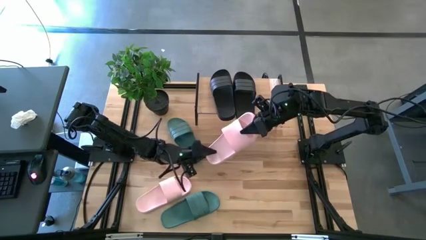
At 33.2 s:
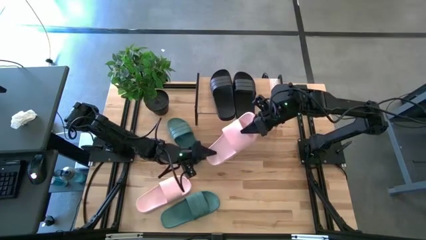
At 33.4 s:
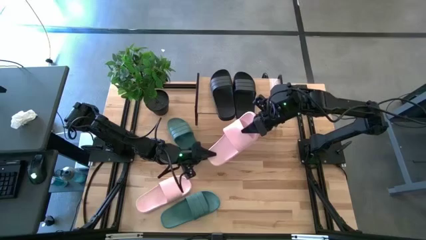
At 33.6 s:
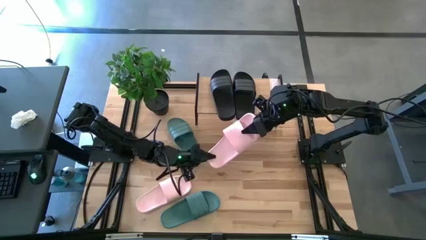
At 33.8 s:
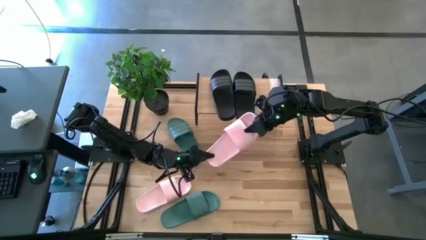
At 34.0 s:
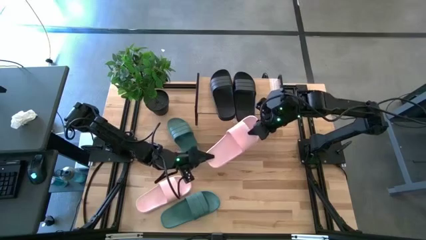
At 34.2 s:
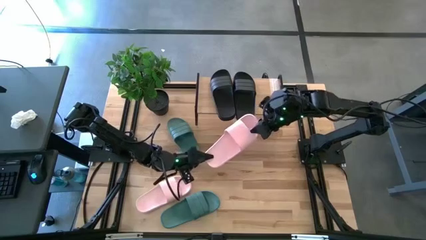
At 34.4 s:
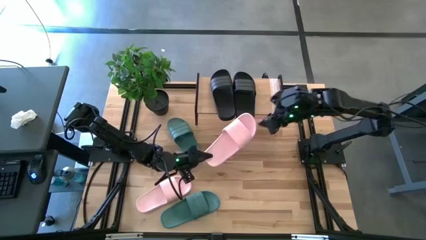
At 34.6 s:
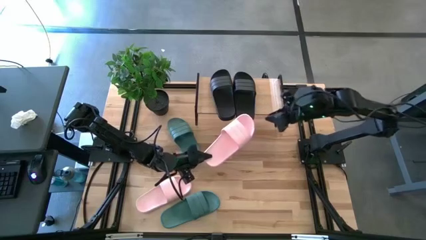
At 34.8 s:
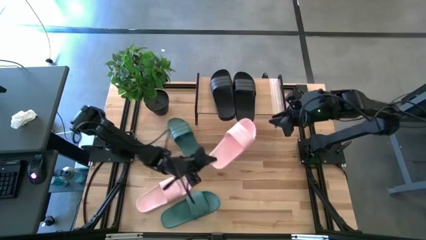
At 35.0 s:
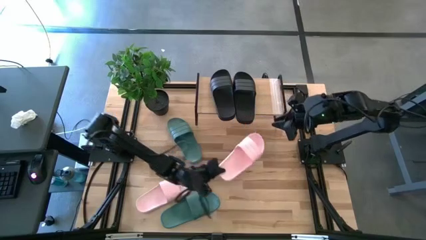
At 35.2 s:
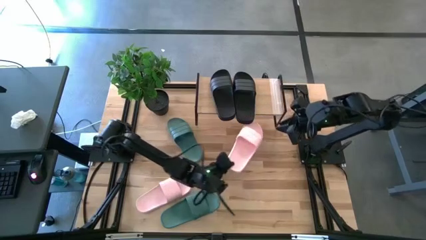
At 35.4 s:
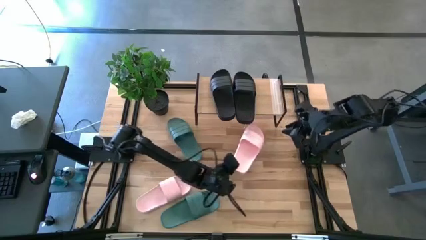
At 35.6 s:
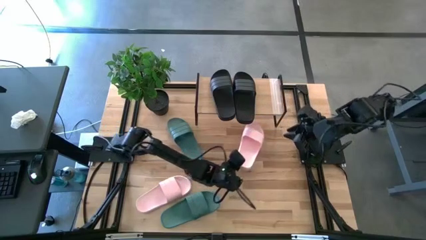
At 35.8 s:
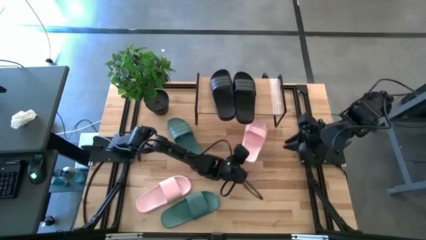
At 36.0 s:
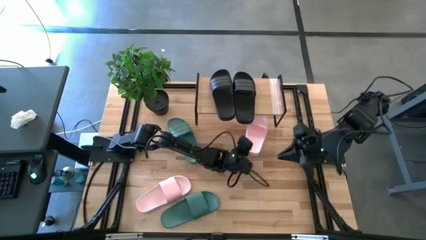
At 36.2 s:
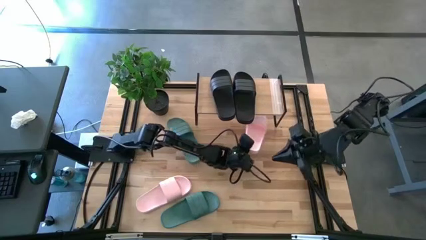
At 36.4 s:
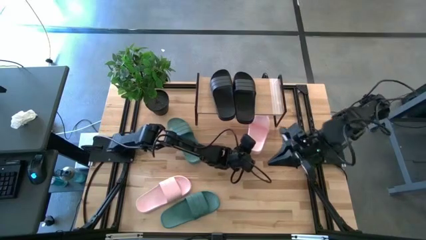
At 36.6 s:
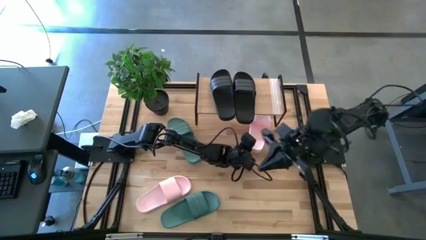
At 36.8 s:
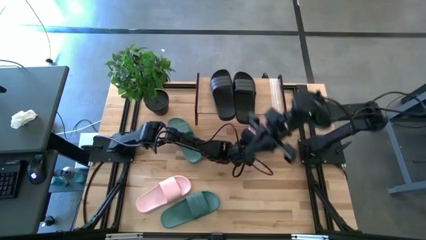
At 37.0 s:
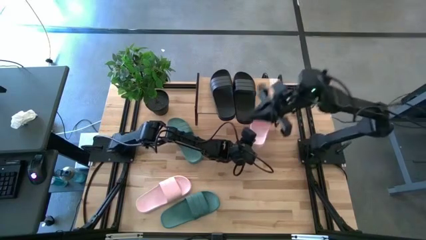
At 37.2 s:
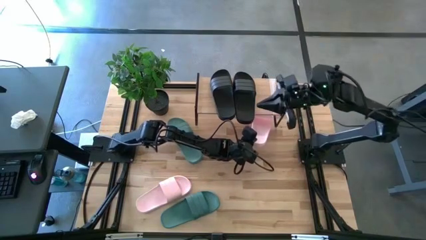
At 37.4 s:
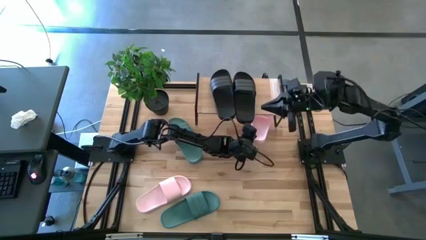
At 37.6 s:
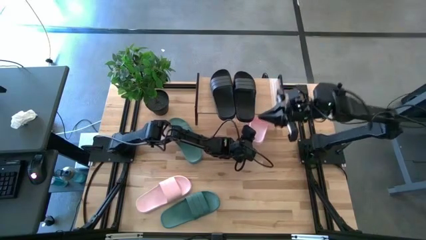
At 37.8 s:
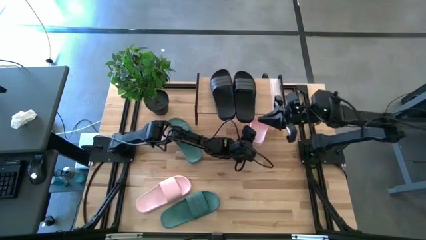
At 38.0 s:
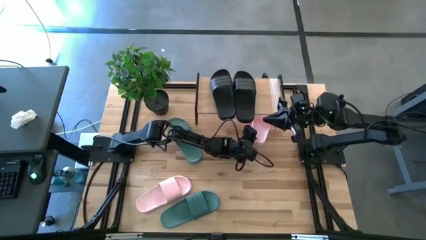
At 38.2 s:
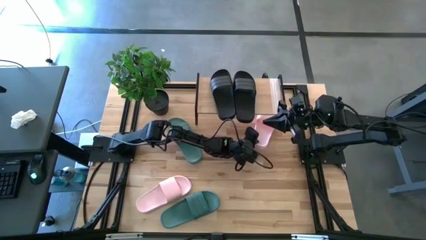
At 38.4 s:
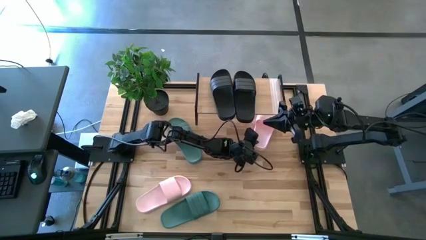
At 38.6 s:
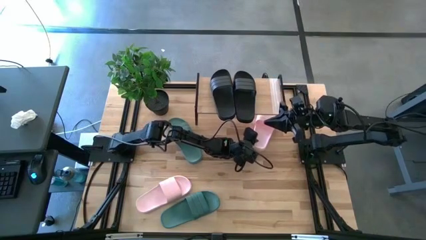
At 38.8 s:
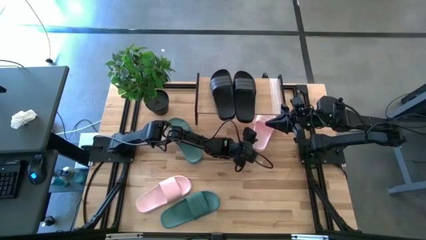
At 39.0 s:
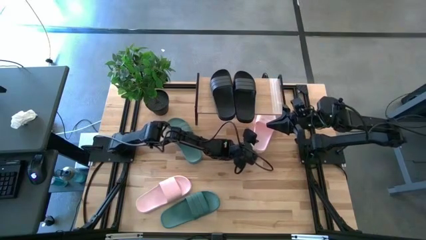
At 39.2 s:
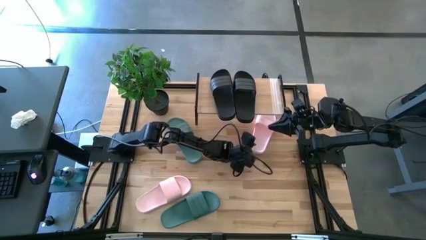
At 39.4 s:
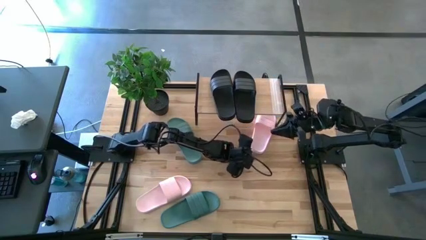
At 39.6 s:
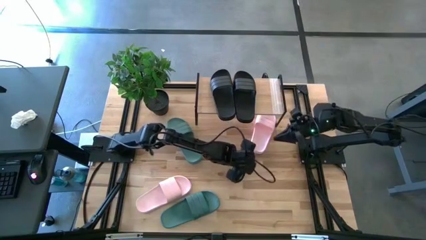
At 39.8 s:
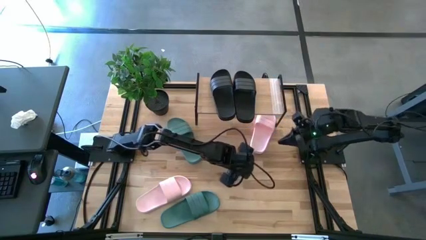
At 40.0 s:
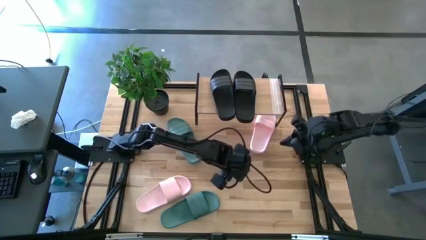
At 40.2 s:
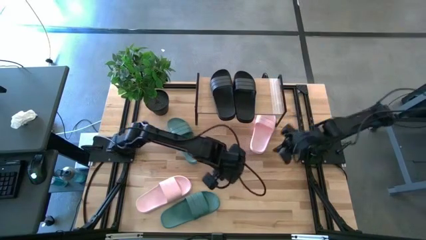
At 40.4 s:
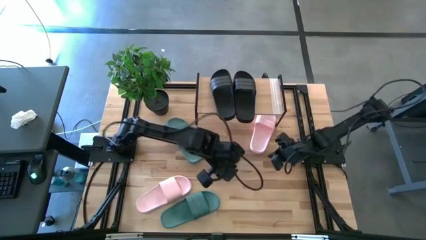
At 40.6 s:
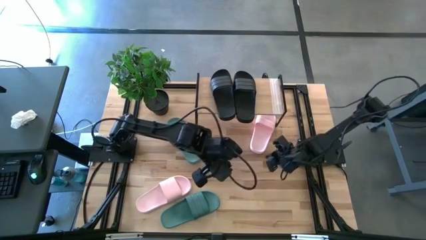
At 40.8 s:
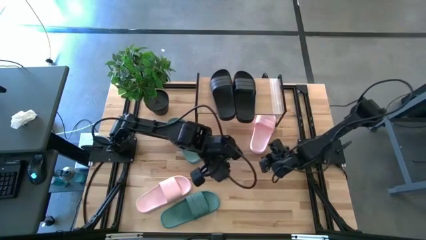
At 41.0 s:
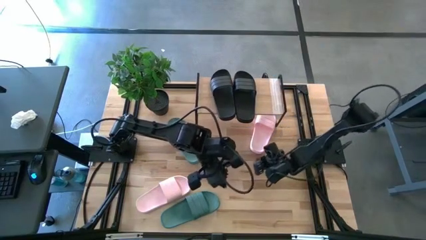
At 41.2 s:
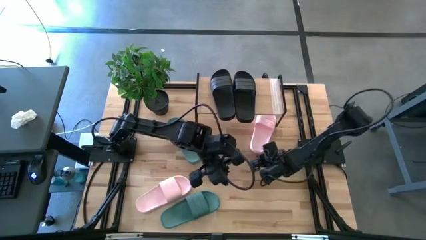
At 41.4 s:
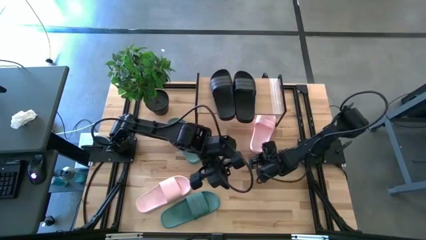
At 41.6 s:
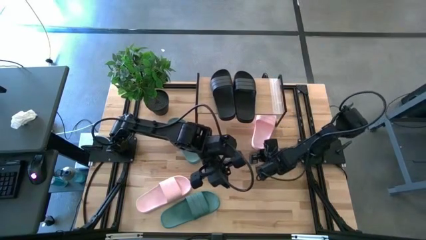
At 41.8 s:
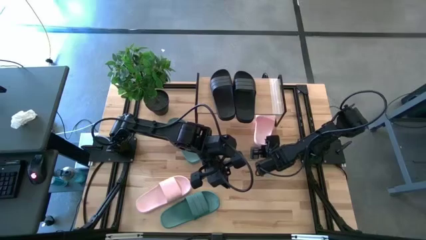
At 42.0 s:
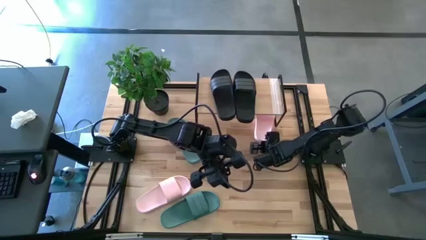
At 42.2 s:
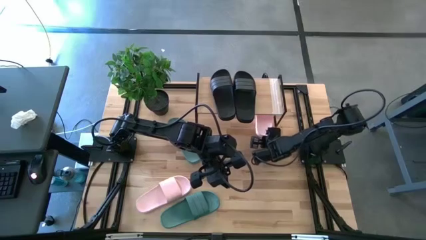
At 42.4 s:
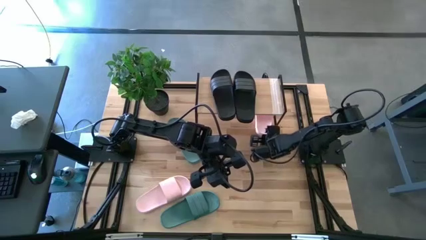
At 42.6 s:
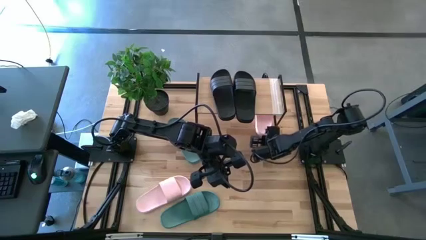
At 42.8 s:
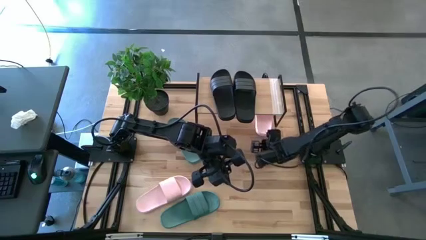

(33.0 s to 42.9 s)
Task: Pick and place slides into the shelf
Put the top pink slipper under the shelf

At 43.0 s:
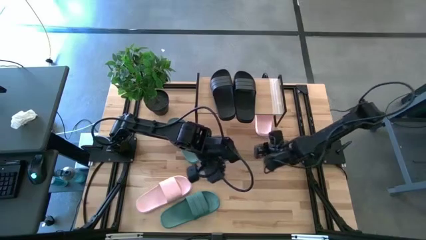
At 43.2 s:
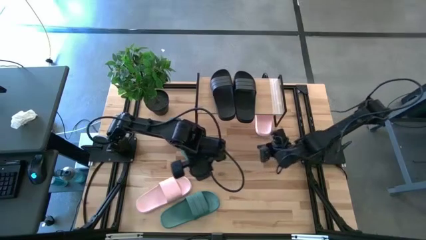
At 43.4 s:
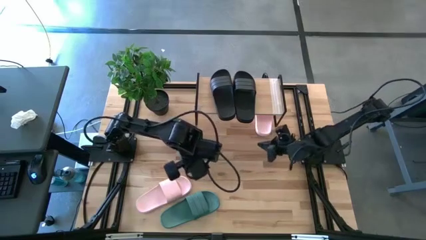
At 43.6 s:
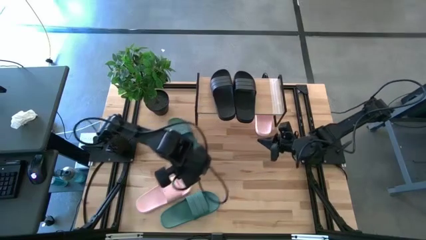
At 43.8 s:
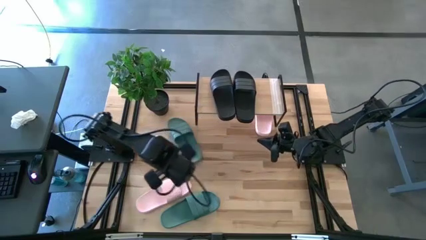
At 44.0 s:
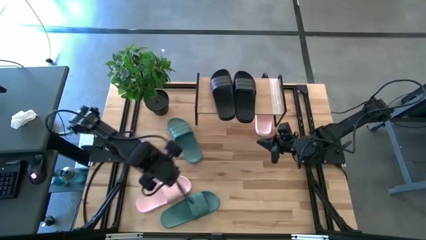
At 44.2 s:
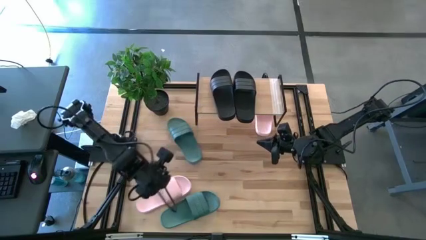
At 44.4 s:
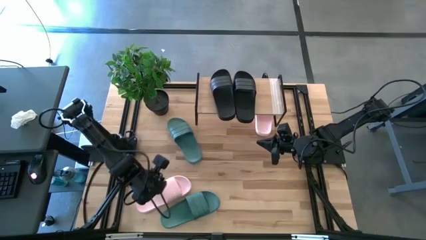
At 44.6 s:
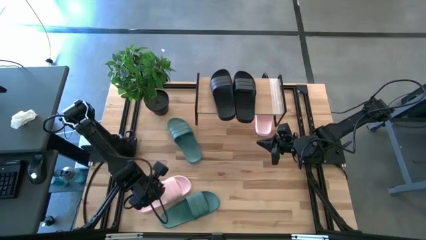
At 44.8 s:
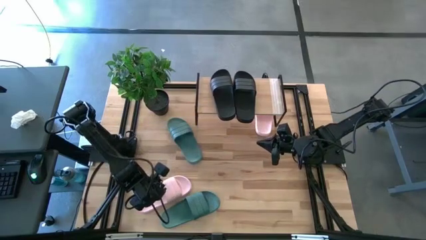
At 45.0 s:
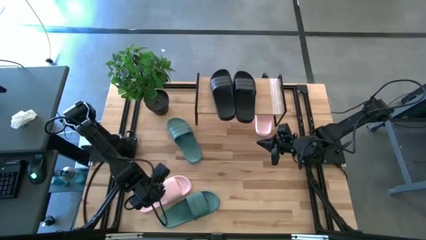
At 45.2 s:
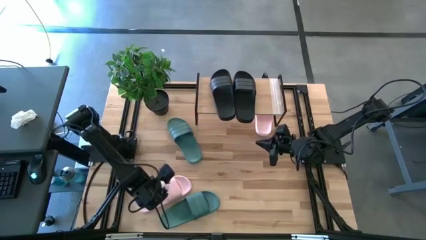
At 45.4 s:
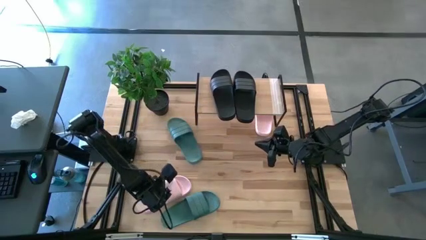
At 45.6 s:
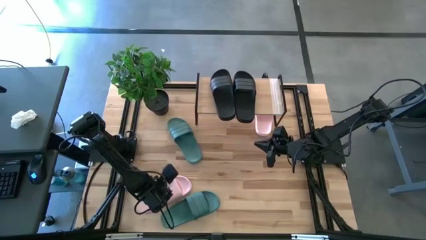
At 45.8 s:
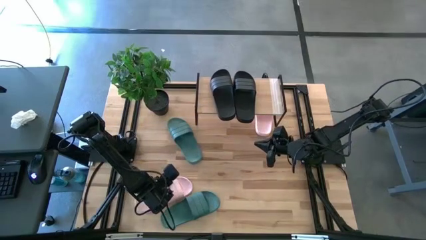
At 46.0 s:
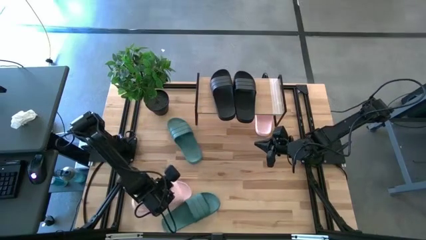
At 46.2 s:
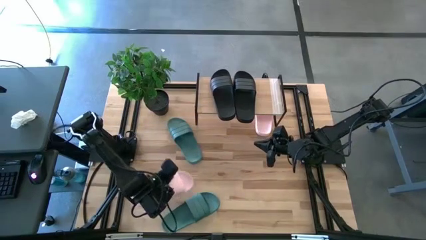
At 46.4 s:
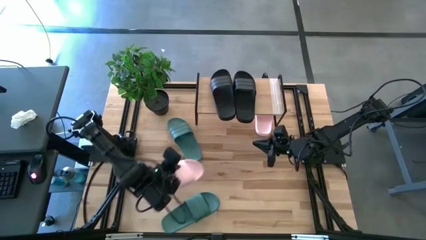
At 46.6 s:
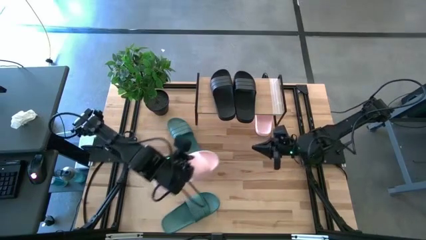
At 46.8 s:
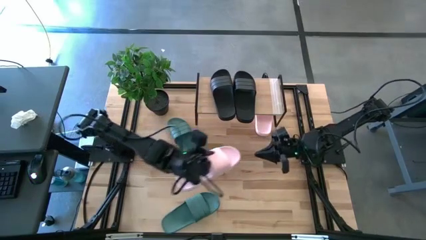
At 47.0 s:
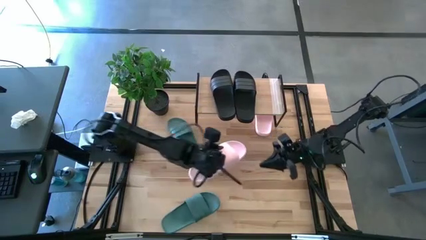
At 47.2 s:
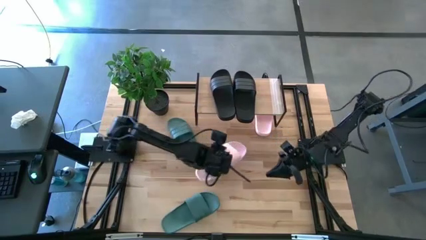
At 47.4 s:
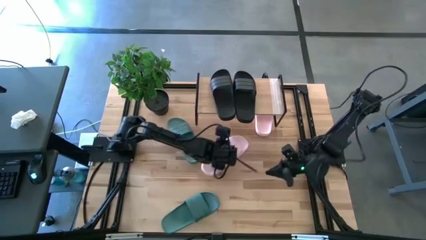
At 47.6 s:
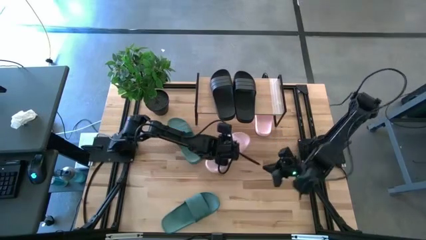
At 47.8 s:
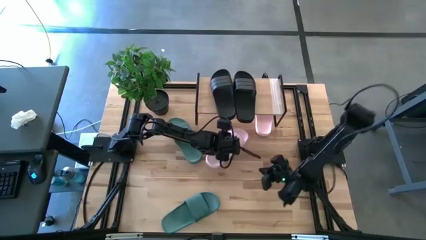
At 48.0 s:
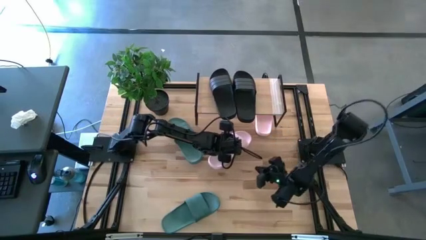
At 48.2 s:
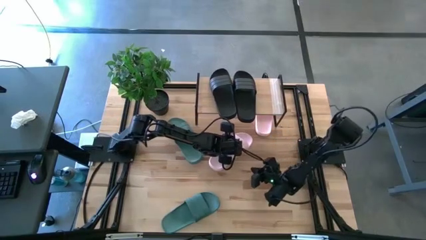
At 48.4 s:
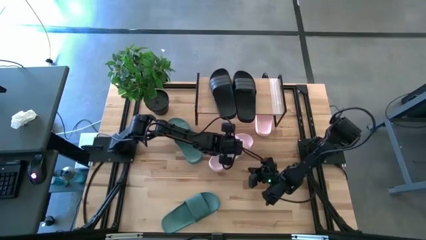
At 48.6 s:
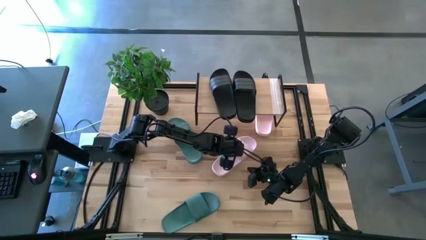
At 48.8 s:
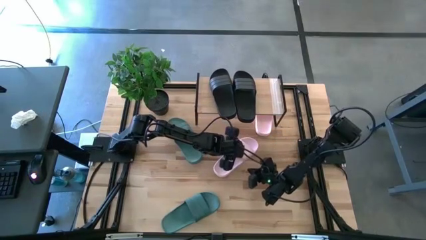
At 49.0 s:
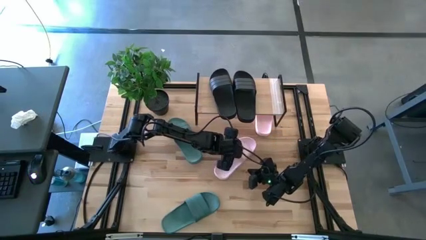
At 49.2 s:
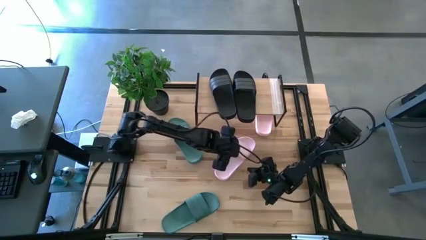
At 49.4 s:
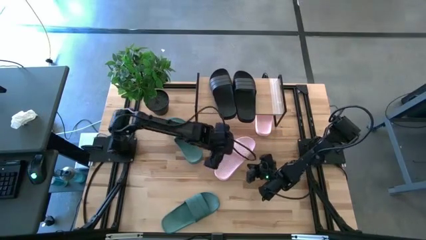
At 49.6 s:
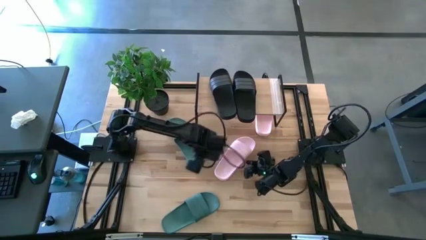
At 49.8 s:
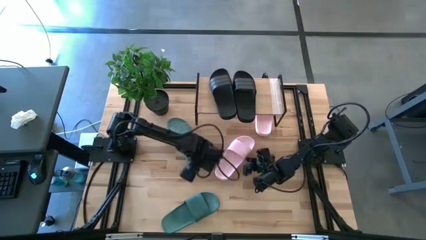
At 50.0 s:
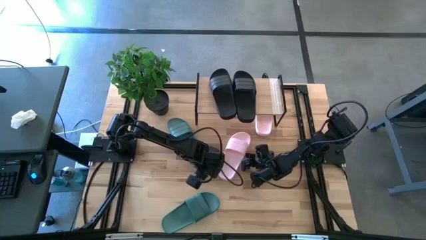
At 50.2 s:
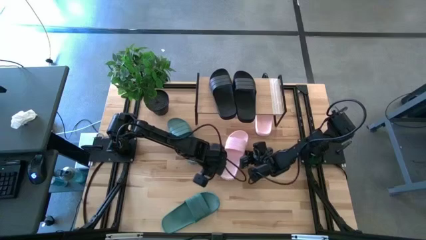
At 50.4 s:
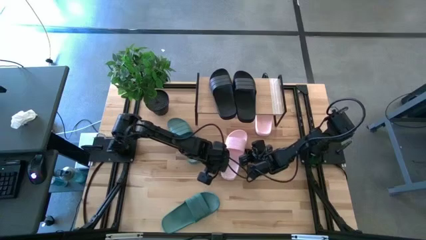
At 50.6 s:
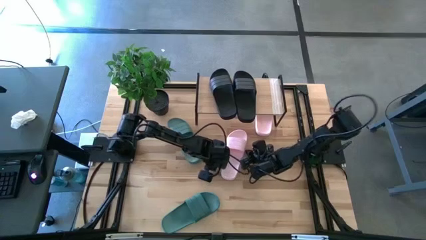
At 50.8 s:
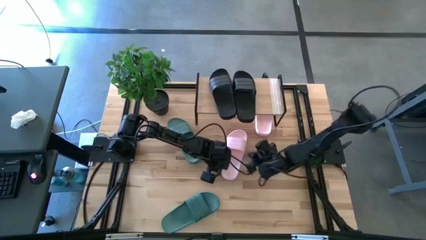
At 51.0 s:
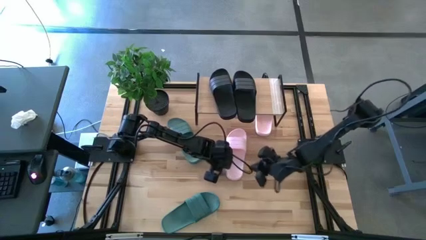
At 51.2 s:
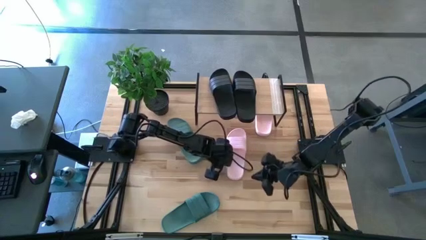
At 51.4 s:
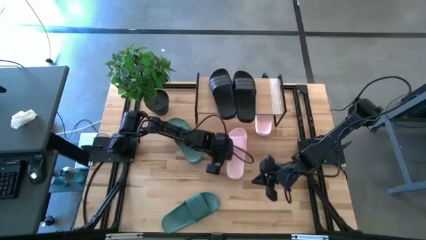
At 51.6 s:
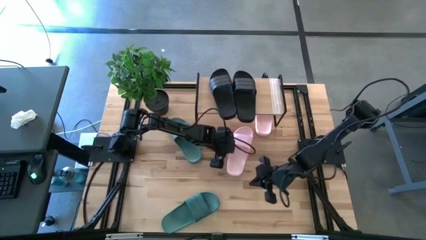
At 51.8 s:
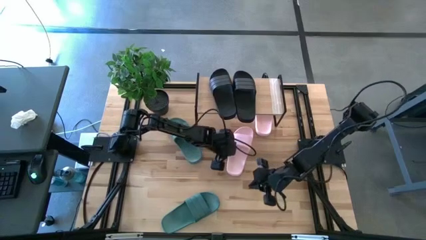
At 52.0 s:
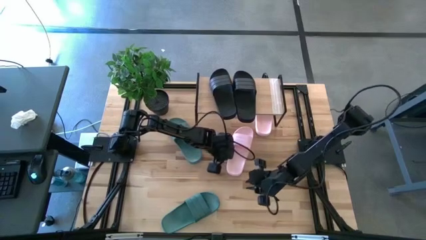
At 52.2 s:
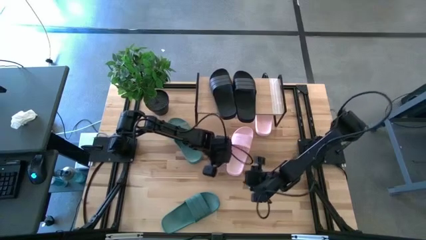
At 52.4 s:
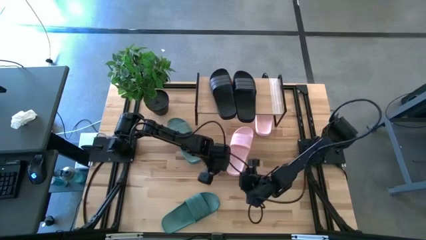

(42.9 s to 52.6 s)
Put the pink slipper under the shelf
